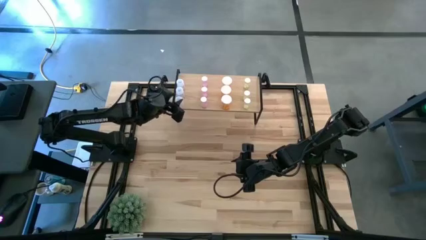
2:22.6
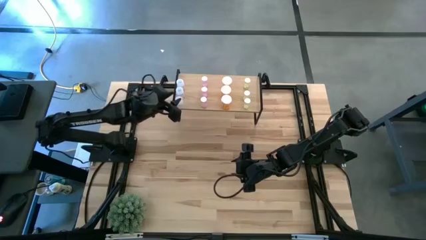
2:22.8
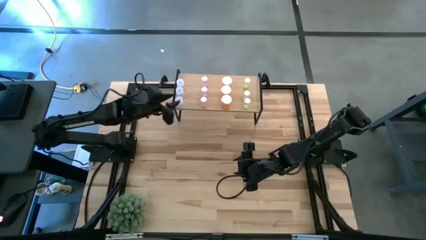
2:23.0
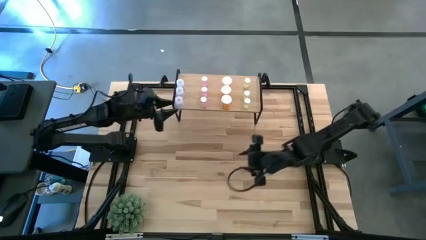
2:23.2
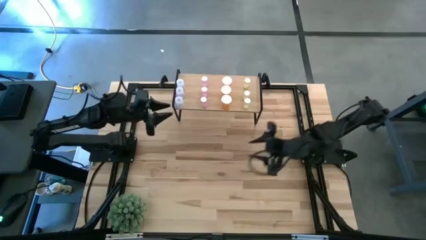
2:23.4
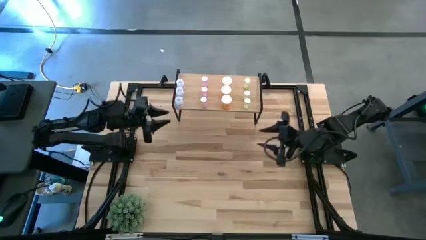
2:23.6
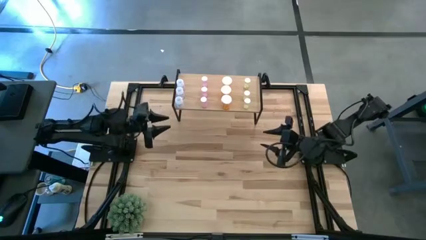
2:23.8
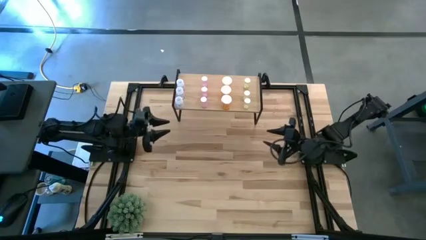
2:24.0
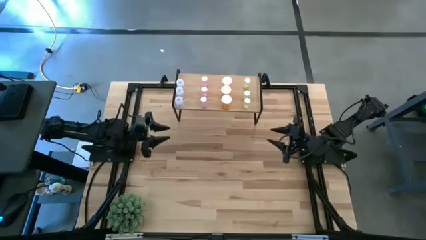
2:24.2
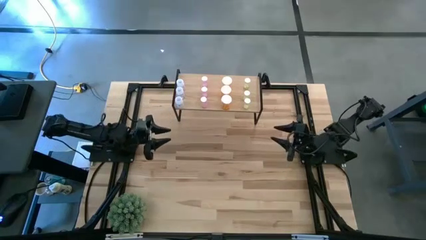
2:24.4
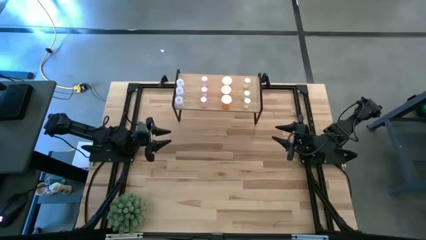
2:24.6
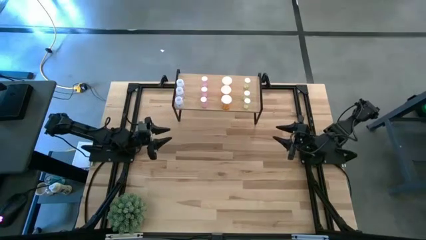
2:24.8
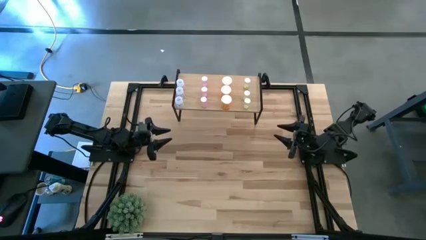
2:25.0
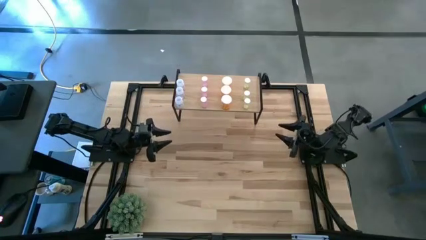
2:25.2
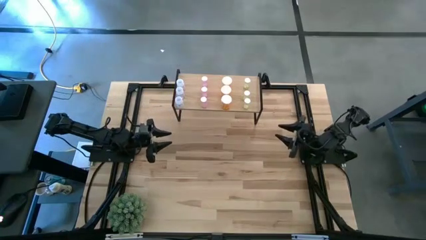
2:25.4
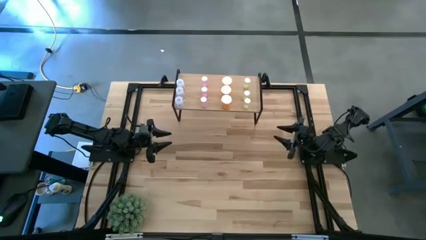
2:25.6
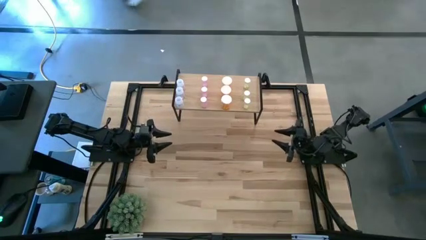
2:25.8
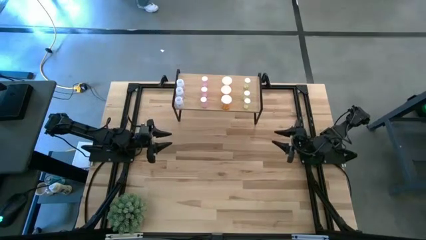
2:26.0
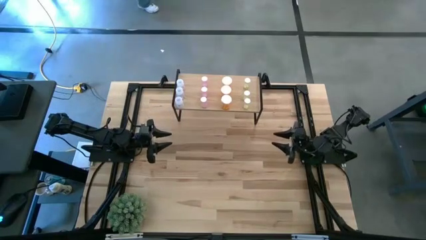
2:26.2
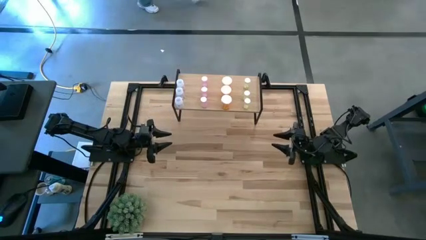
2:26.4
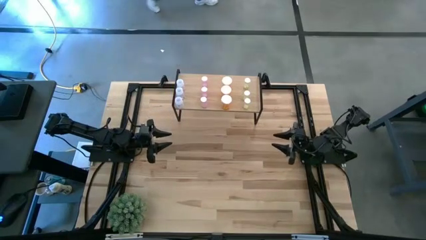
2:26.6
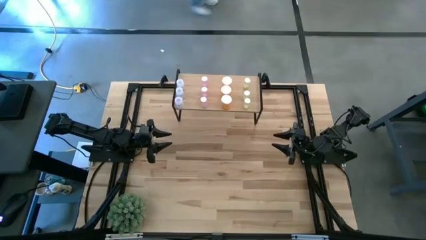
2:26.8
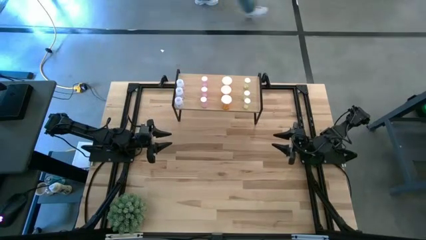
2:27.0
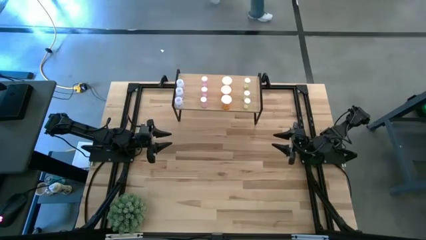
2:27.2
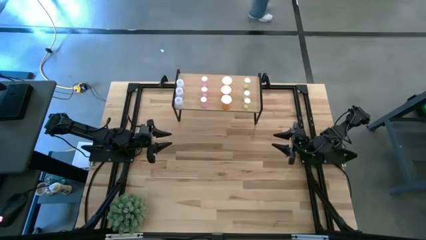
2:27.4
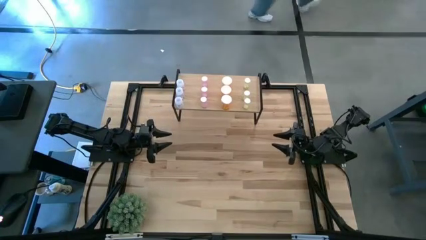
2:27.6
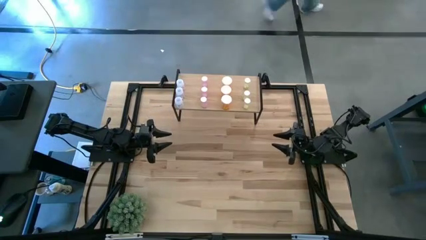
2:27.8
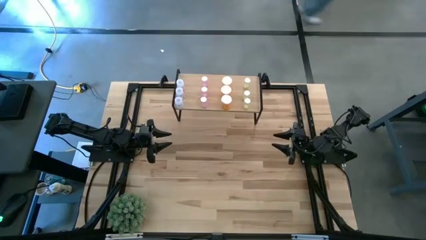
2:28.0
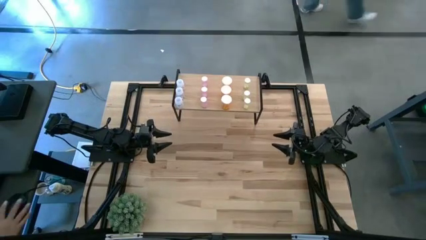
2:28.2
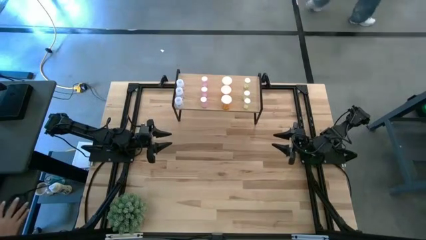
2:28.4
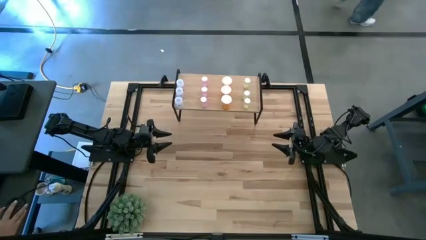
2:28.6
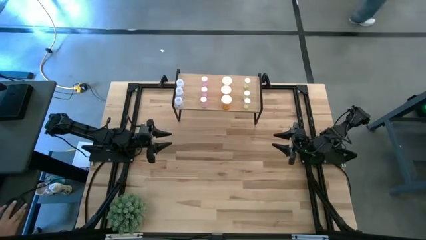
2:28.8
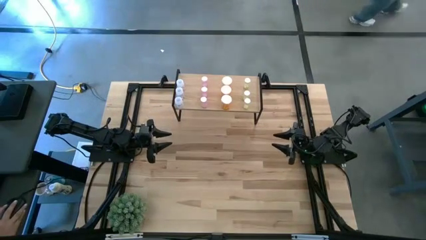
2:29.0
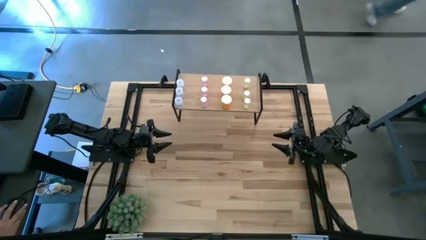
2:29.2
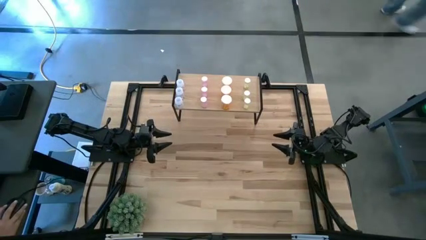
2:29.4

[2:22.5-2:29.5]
Task: Pick and place medicine bottles onto shelf by color
Return to Home Position

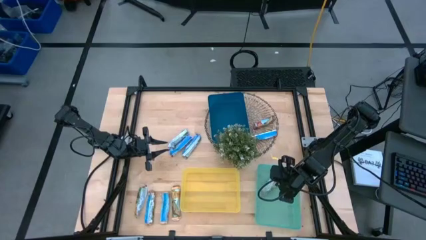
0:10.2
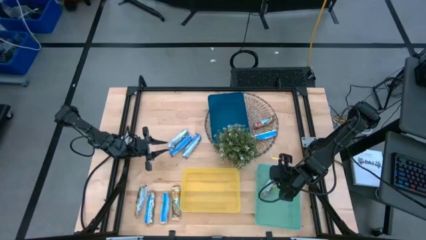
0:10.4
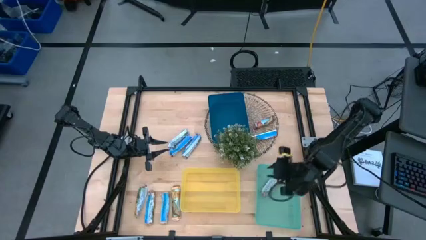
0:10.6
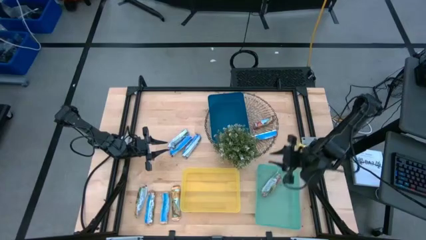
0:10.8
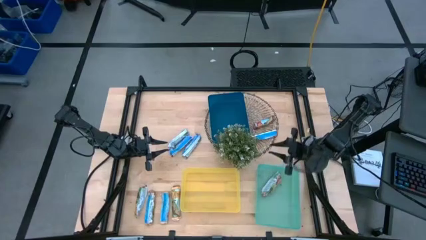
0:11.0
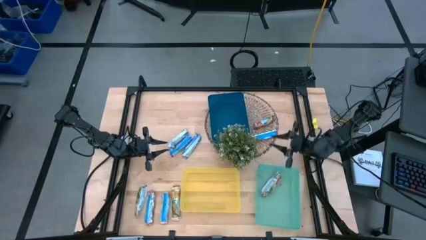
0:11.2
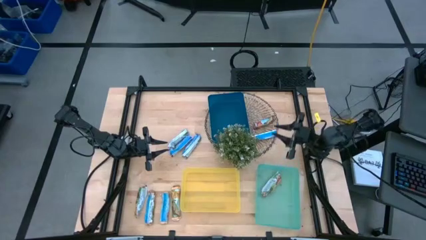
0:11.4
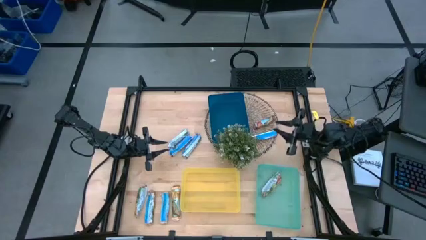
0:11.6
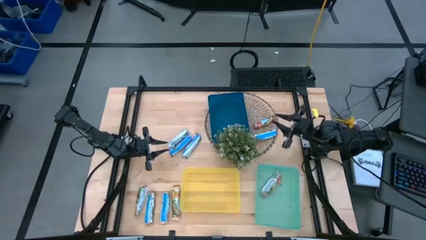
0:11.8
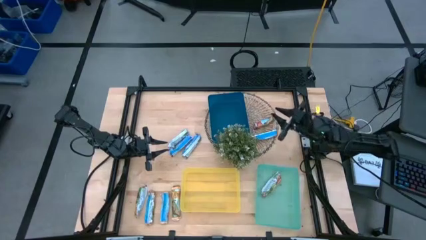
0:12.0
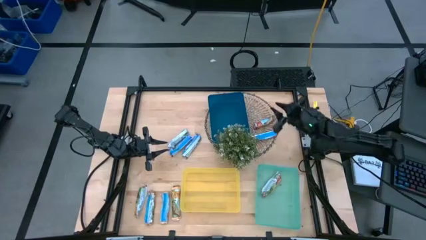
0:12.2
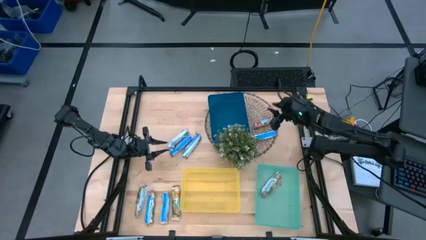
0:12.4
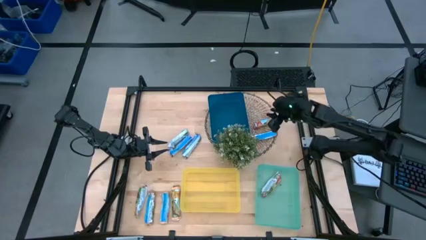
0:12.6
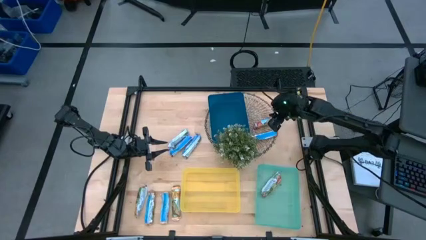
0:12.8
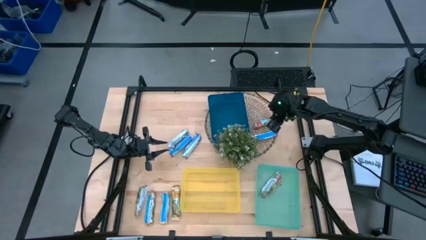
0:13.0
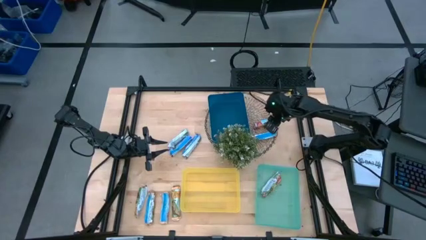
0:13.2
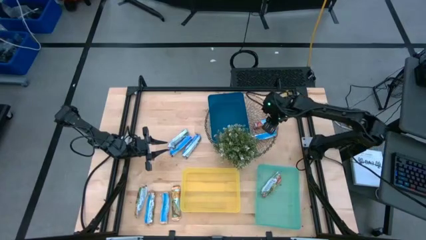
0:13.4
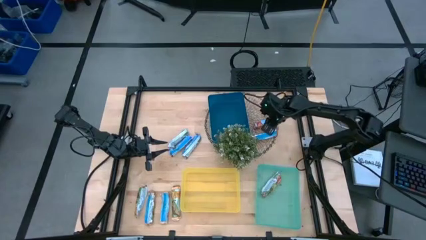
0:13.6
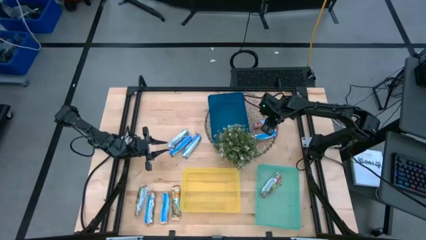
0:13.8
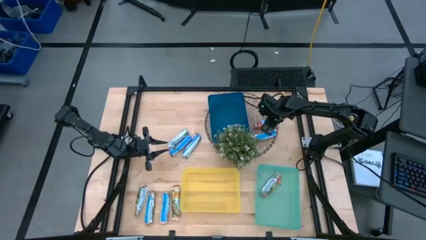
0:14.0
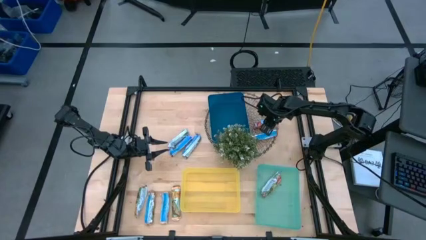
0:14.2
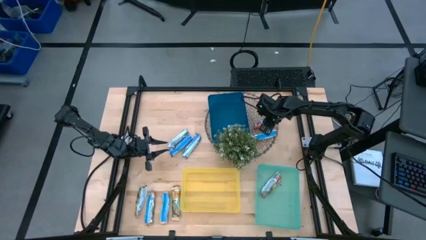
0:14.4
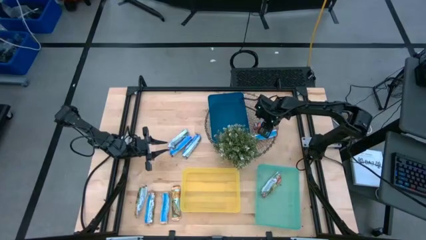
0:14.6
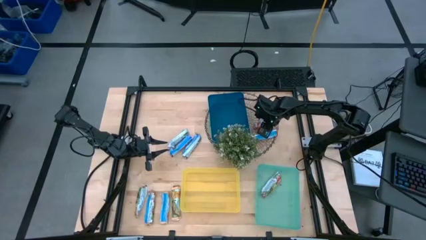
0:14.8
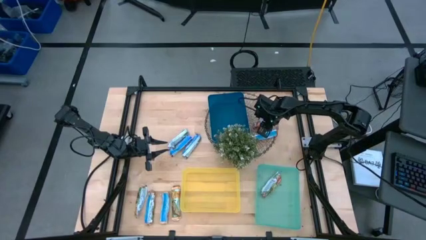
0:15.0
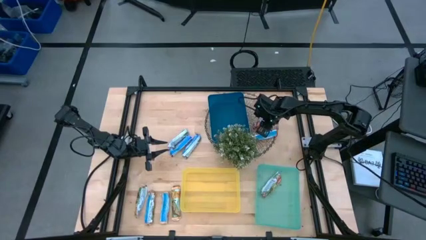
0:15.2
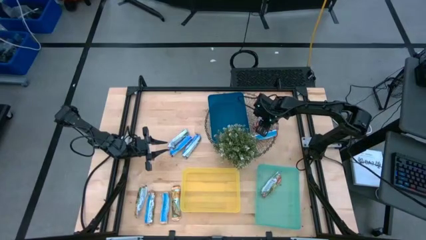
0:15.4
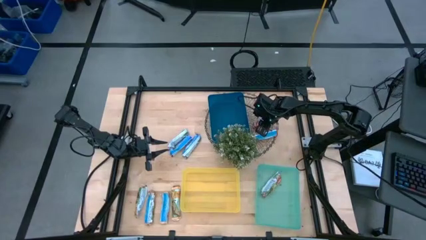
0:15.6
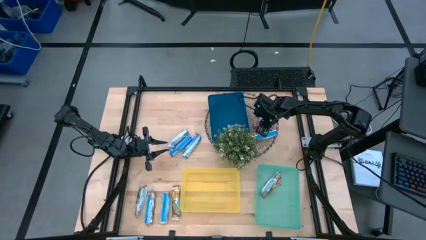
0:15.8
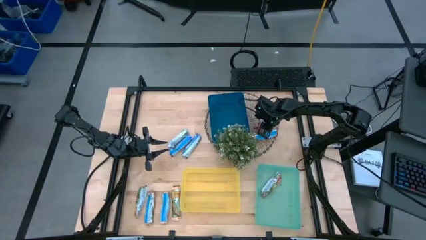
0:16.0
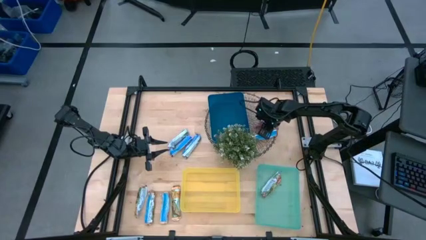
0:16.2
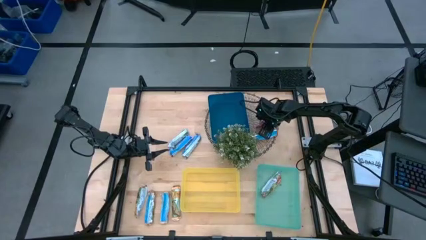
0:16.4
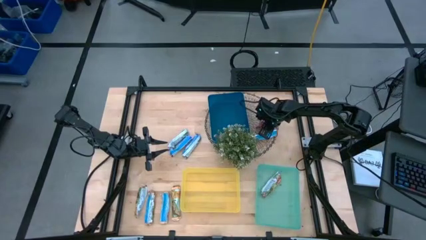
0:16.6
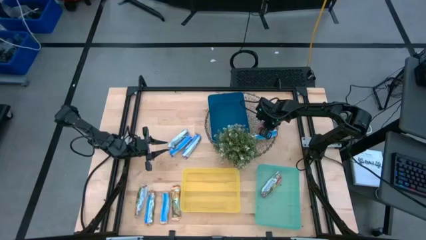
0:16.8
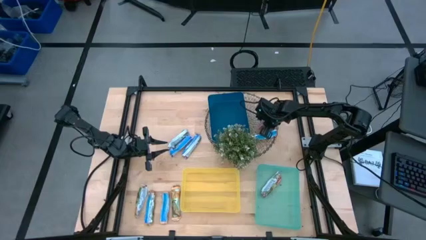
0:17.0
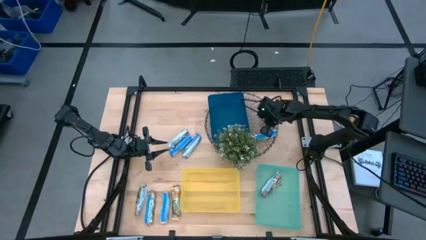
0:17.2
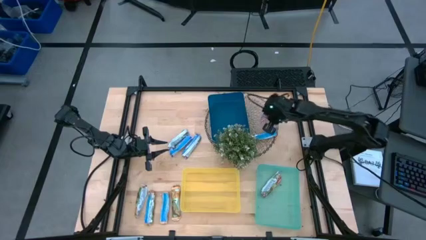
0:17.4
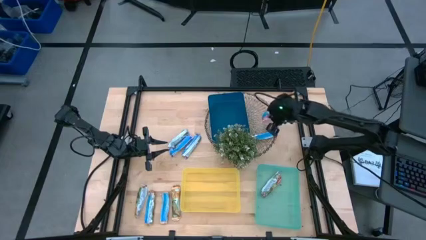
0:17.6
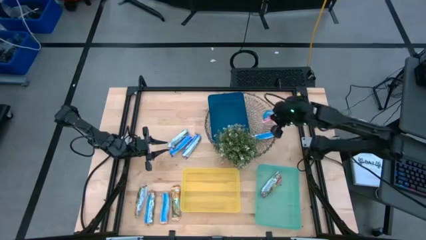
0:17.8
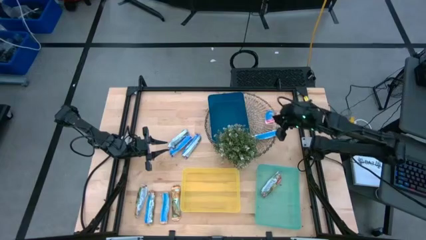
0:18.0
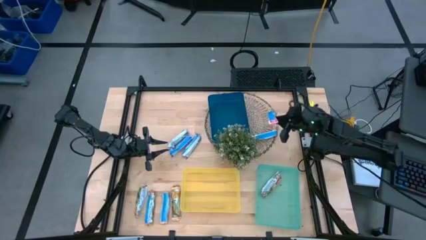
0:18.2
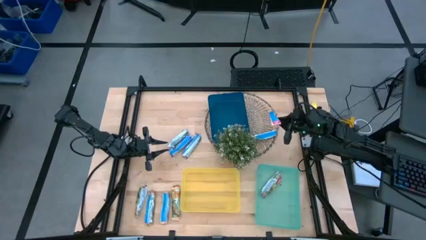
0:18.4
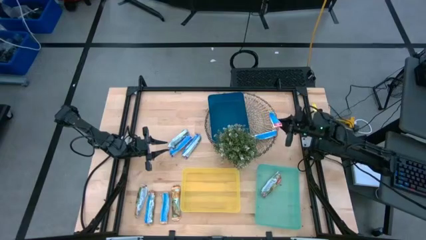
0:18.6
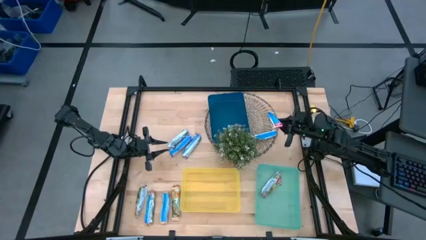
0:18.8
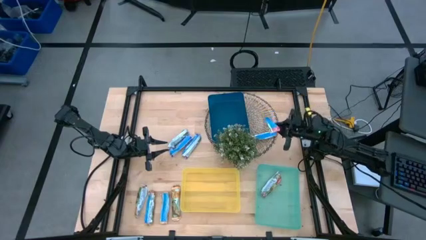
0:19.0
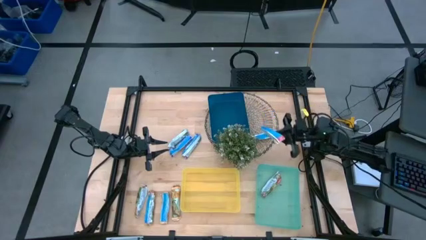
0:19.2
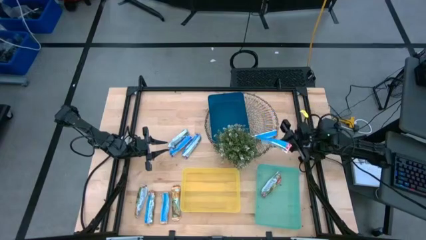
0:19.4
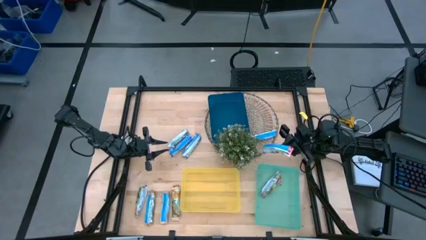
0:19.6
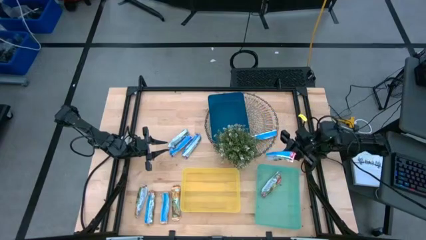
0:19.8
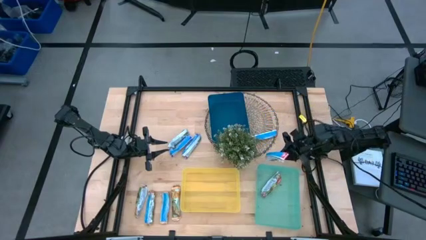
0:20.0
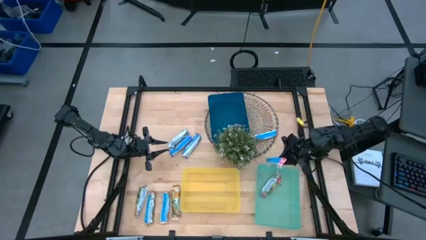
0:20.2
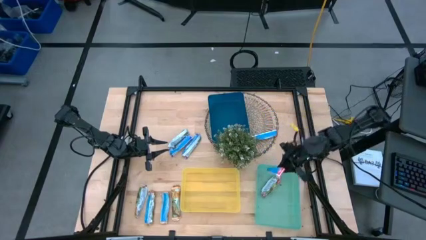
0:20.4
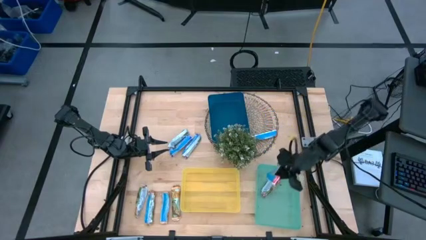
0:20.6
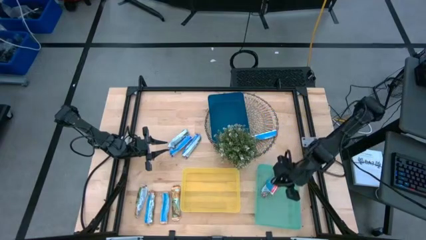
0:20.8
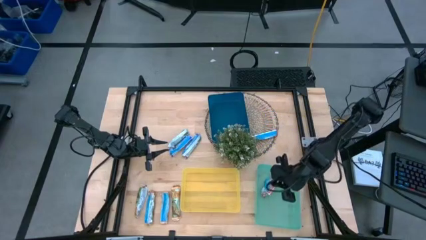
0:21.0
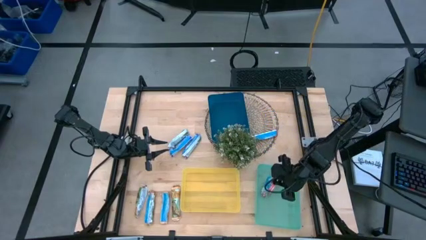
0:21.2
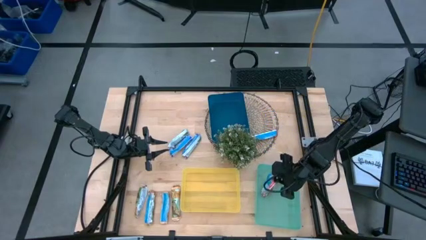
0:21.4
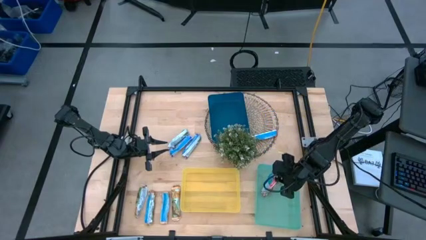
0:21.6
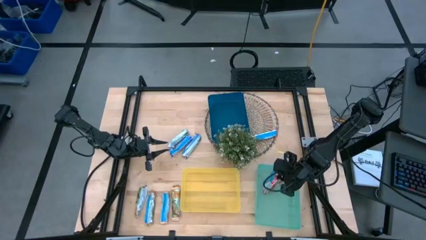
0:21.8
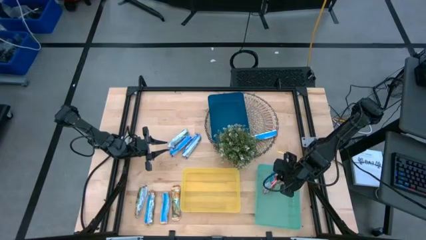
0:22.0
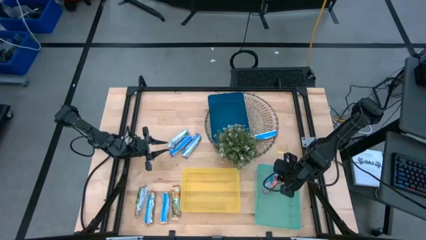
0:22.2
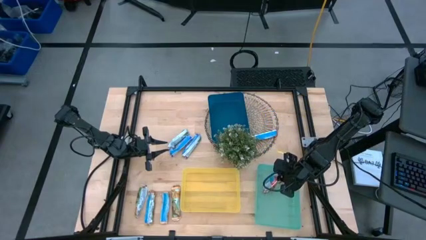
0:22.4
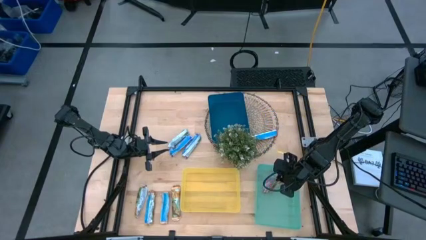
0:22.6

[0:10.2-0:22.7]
Task: Pick and place Granola Bars by type
Put the green granola bar into the light green bin
